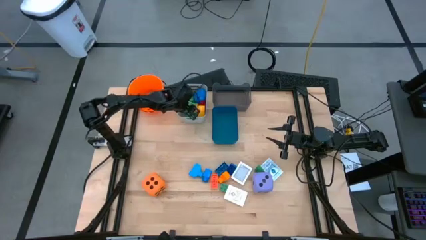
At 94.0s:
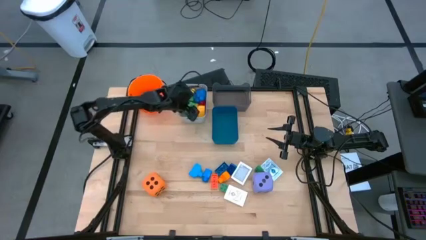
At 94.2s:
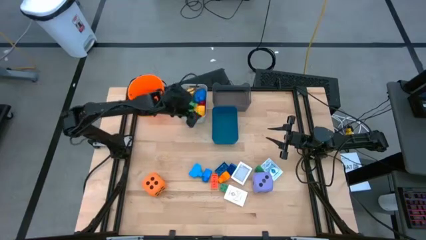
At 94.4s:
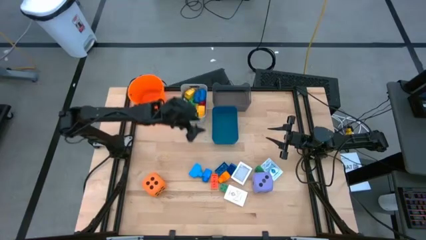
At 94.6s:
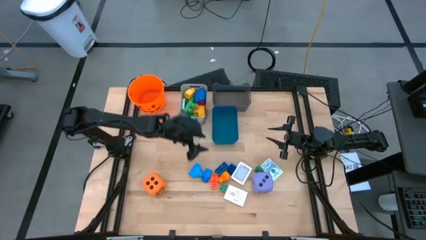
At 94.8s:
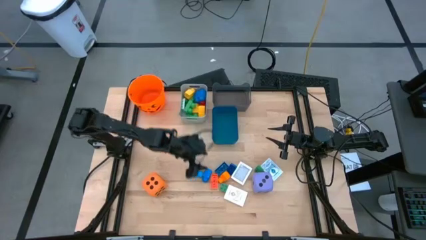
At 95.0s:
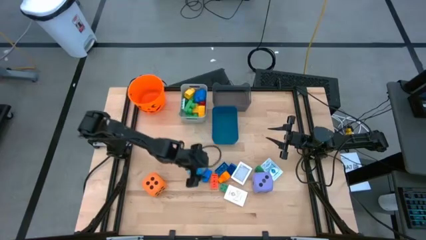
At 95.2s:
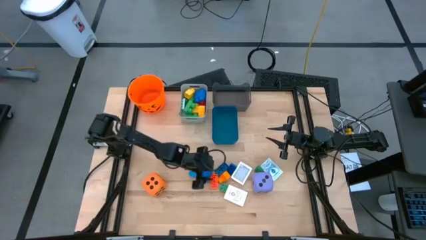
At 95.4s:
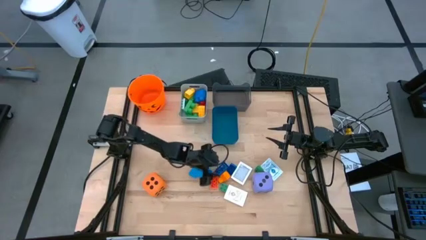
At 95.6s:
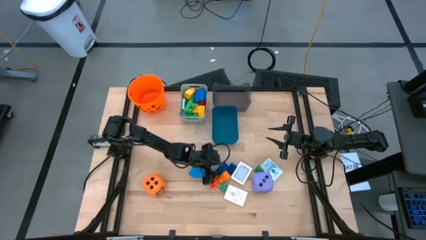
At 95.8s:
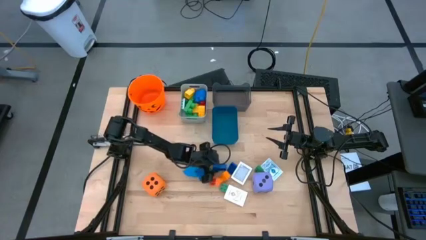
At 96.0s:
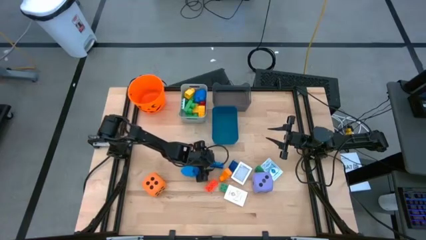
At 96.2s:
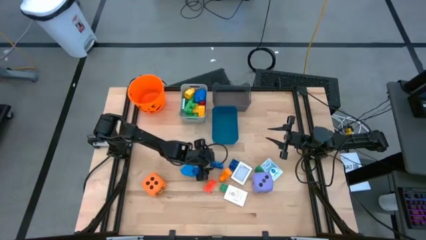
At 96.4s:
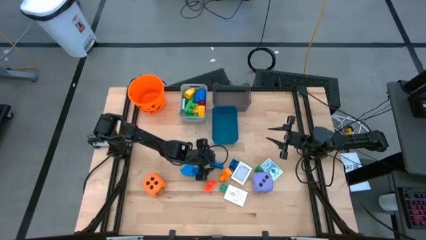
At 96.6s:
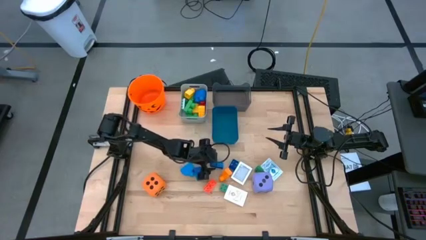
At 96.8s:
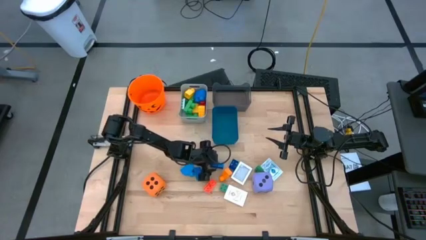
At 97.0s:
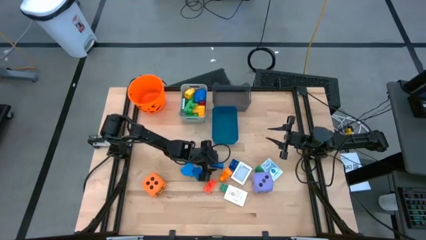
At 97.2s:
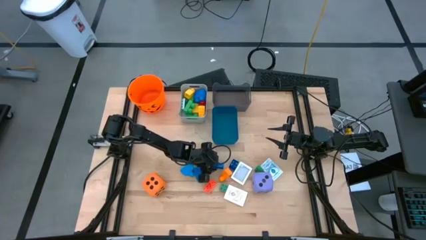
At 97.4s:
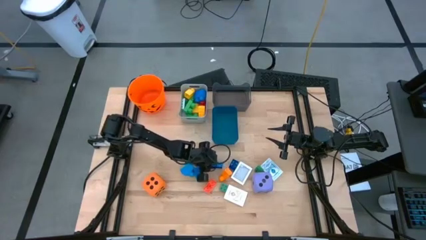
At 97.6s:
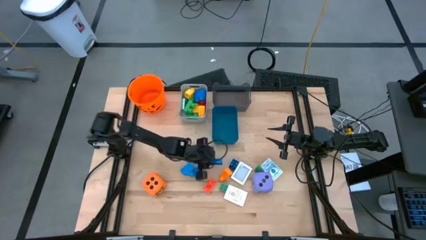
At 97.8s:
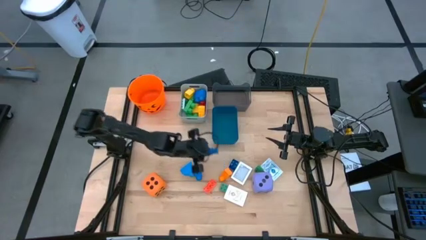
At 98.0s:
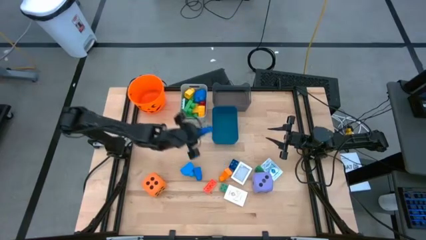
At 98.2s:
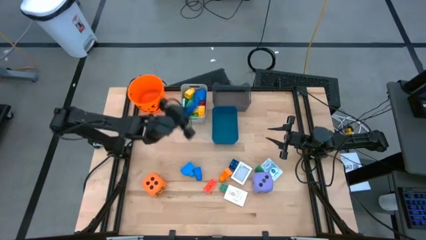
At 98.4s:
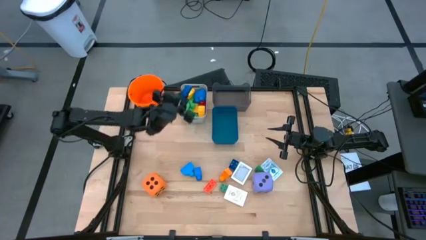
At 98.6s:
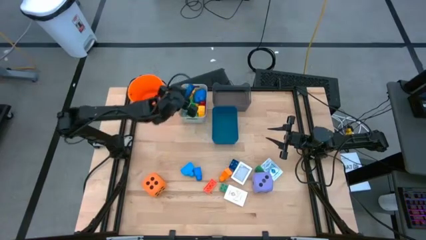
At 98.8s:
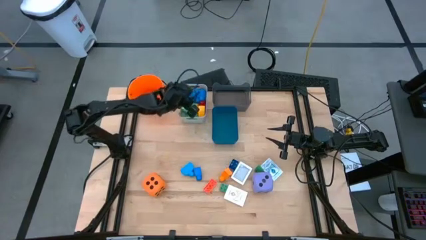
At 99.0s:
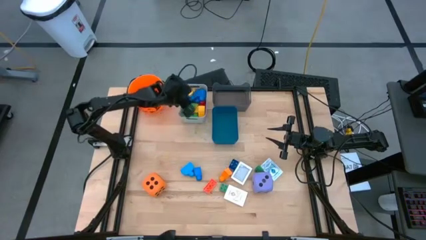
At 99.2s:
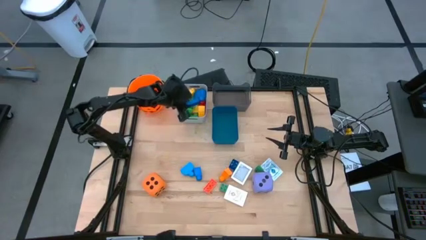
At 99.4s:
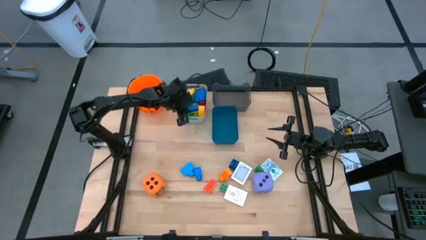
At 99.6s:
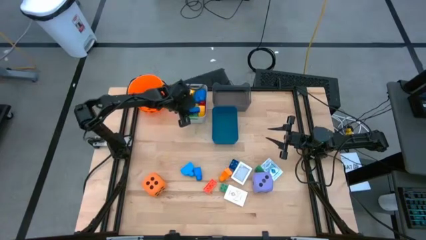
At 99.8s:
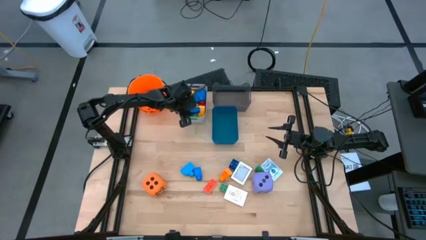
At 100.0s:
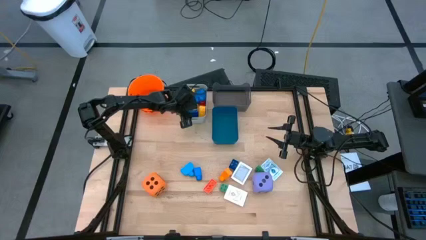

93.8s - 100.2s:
Task: Pick & Place Toys
Put the small blue gamepiece into the white bin

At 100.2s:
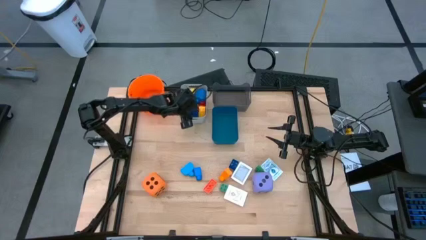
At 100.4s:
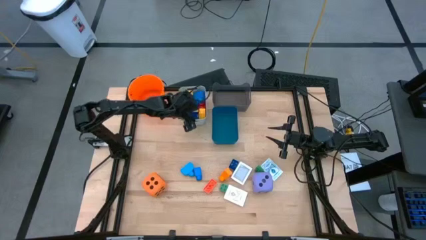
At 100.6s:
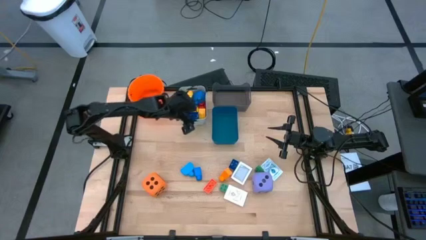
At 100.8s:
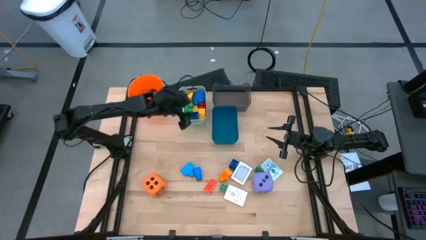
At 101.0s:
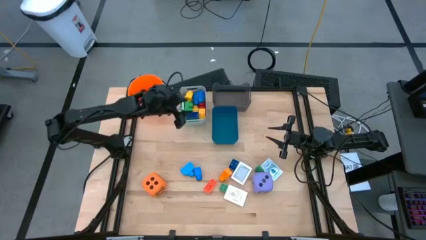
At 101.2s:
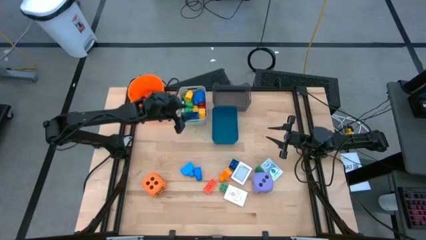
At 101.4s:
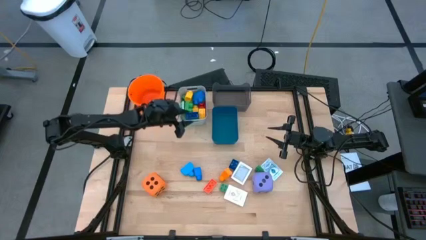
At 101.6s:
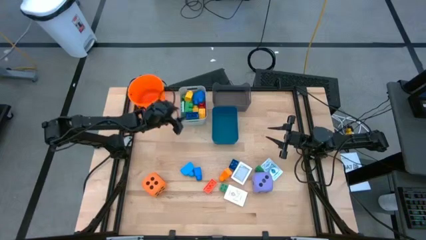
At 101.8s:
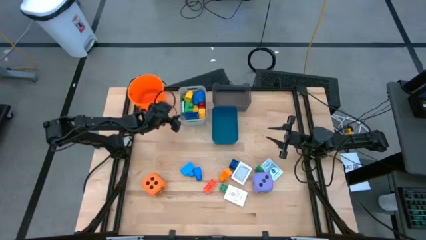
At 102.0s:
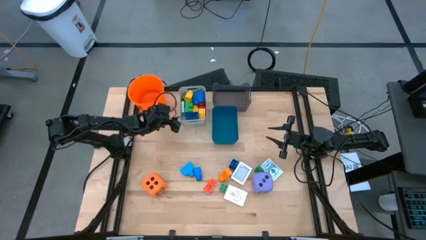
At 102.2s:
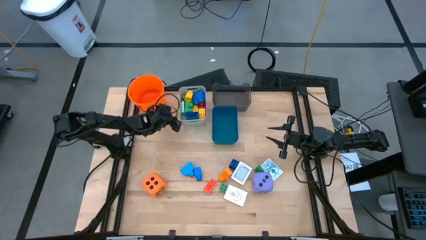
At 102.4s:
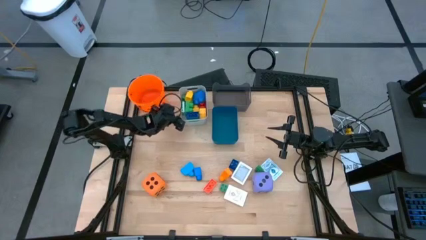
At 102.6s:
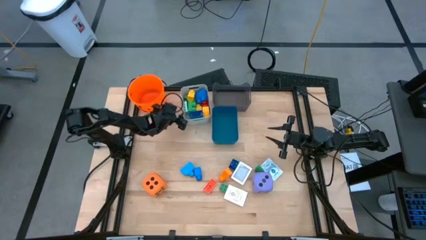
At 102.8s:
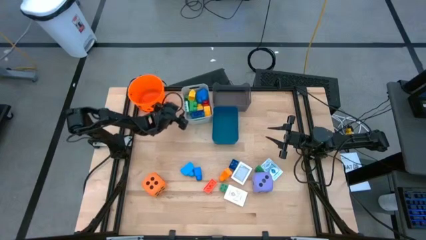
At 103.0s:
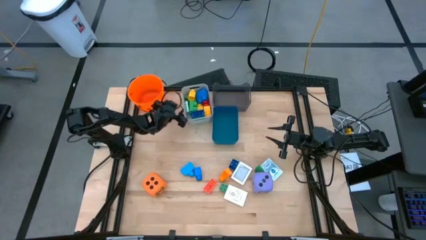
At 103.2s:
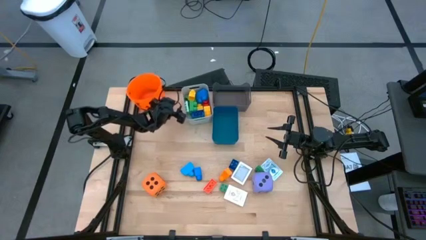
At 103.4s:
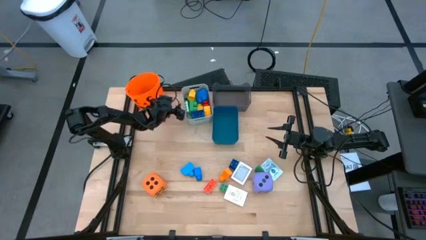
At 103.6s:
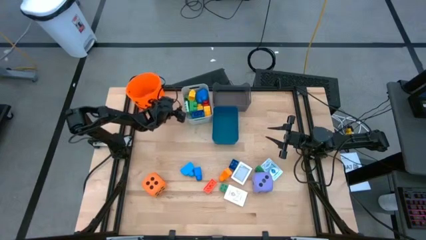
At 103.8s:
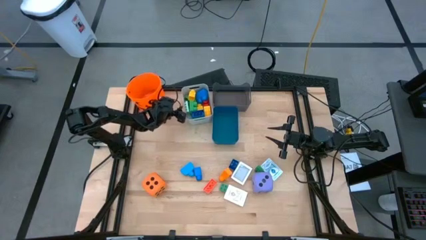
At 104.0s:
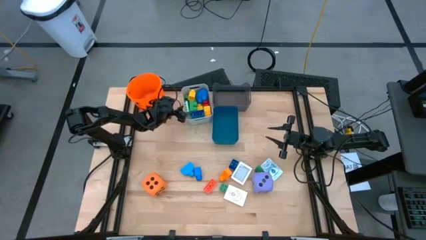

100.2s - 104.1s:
Adjust the white bin

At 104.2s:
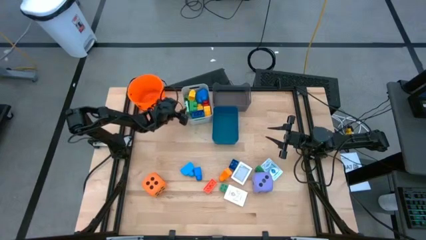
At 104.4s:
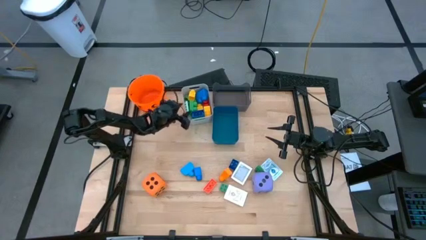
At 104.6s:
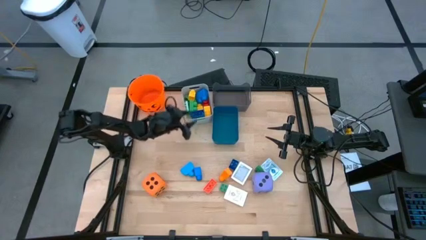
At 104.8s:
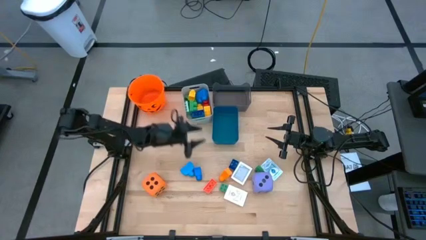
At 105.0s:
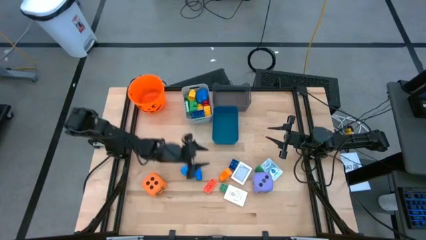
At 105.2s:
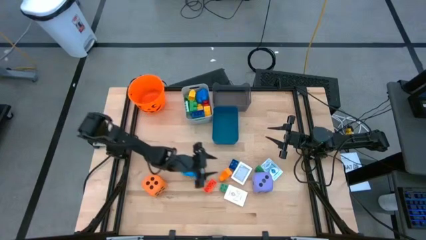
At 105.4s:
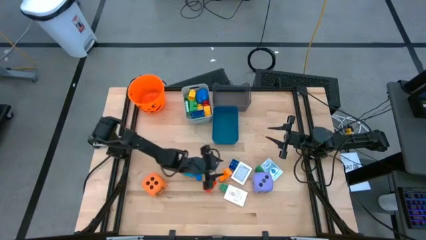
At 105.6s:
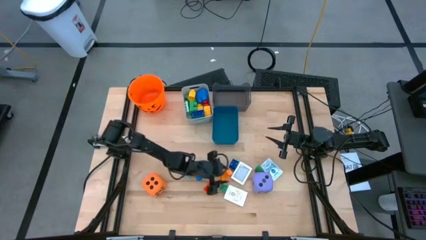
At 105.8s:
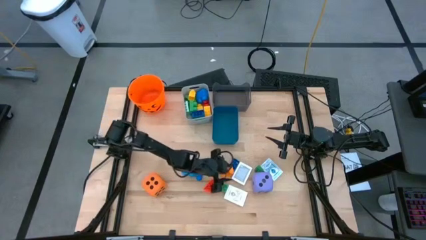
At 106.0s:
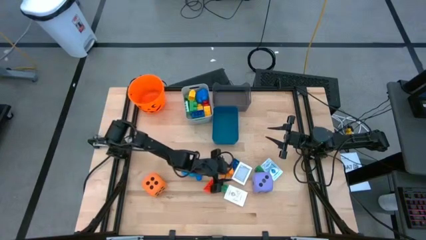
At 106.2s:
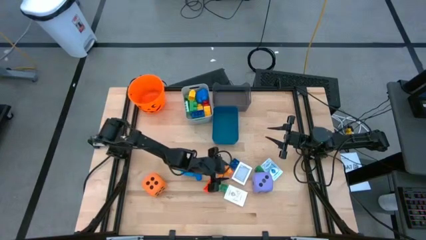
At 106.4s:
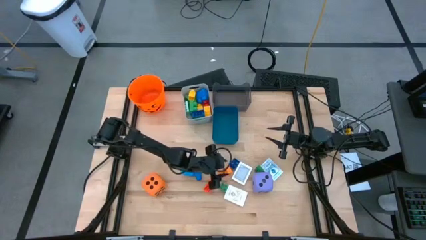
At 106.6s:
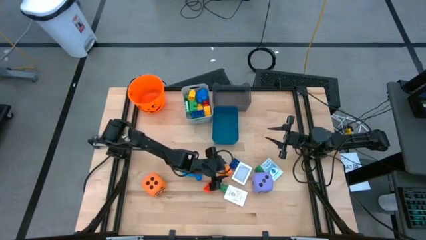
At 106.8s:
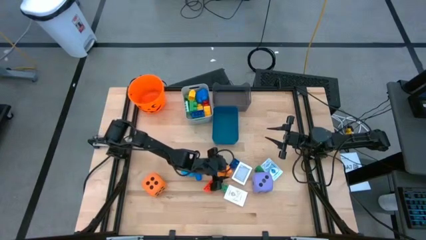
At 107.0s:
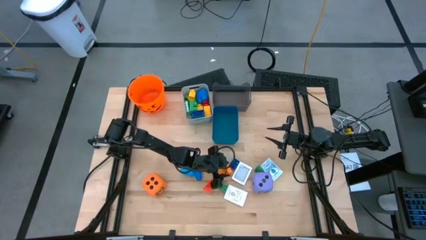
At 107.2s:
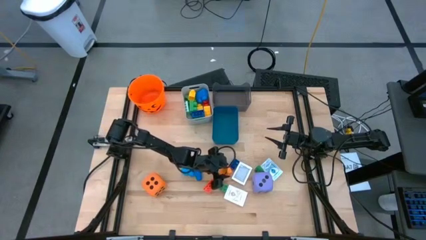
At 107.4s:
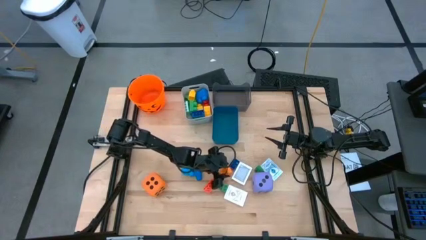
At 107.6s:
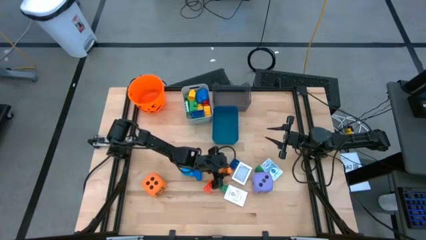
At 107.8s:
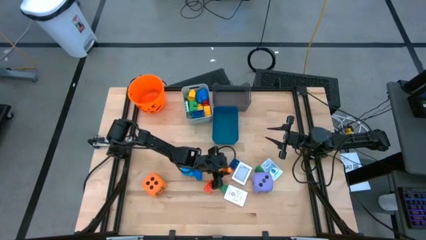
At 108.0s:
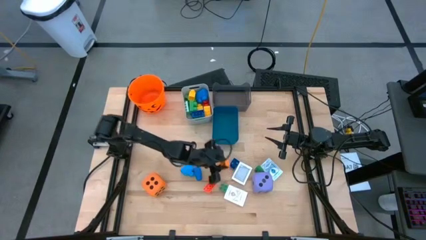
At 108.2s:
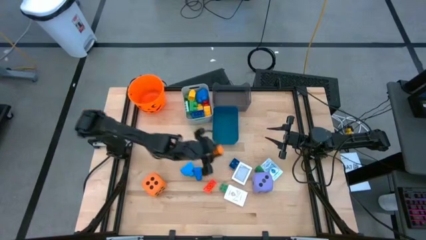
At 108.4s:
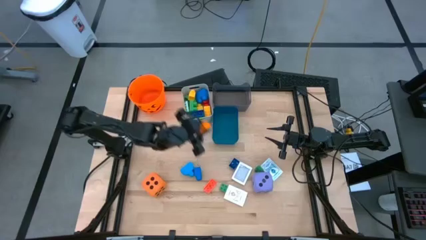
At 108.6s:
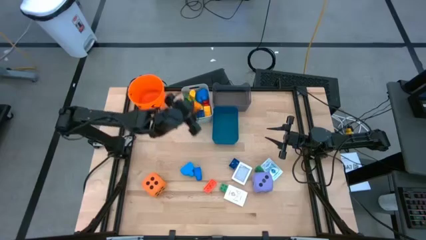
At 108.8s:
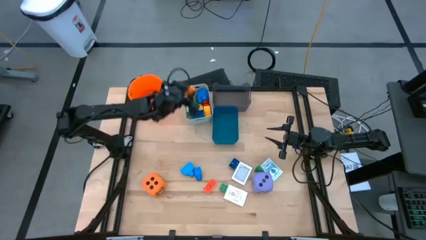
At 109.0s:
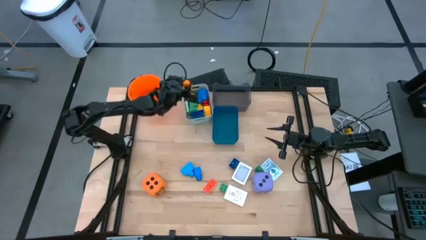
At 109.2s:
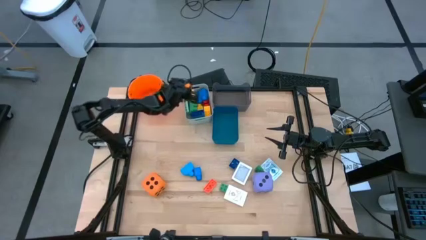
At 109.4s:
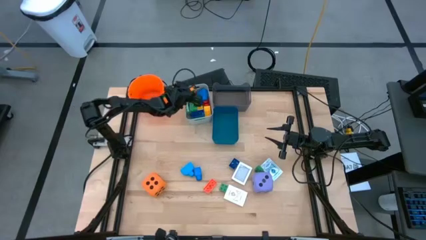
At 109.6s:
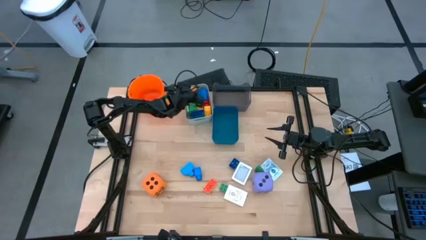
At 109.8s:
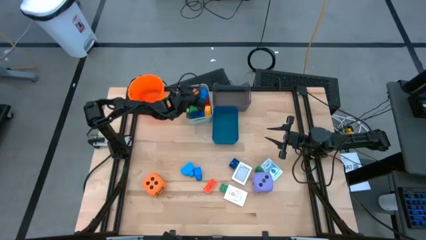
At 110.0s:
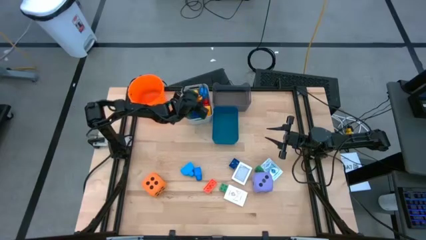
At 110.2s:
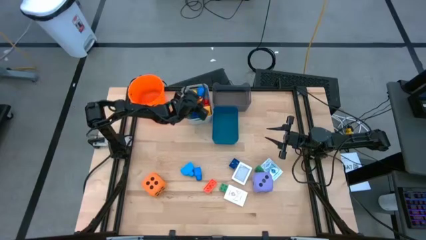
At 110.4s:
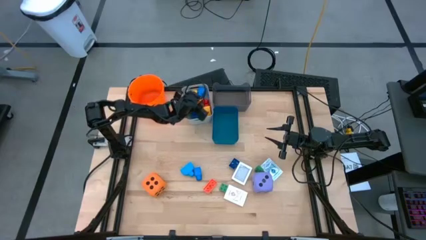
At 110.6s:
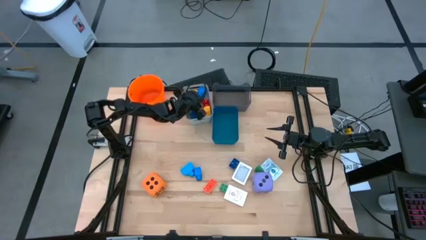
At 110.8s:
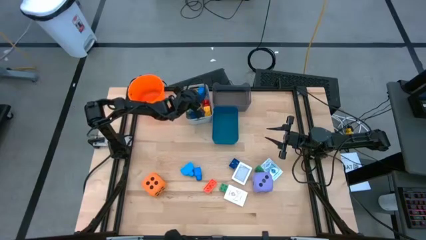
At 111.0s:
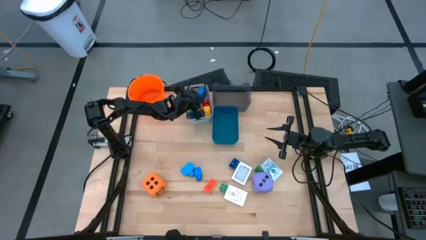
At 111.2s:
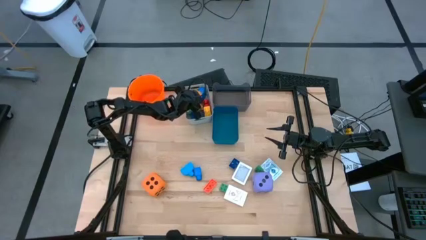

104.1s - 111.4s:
Put the orange 1 stud gamepiece into the white bin
